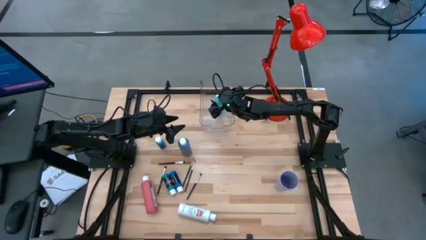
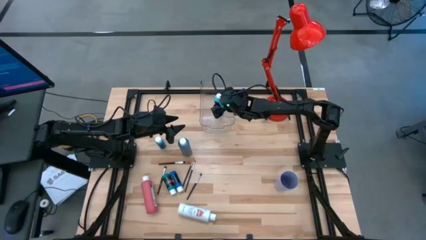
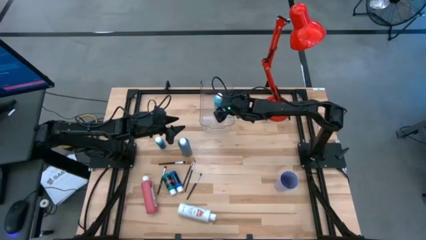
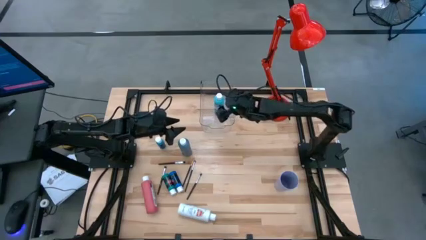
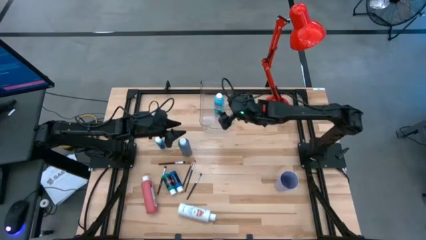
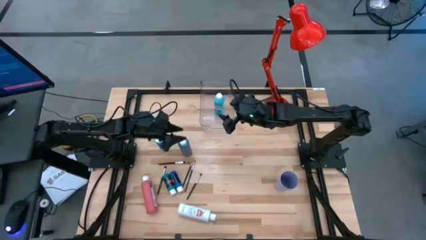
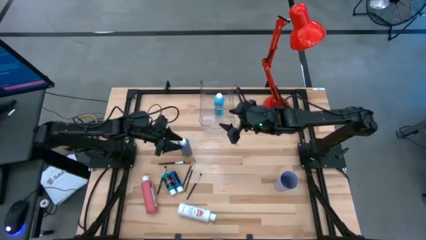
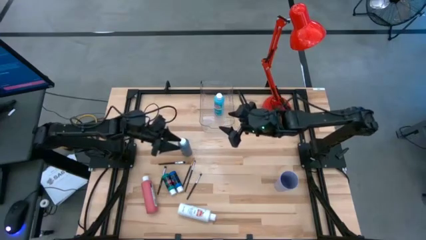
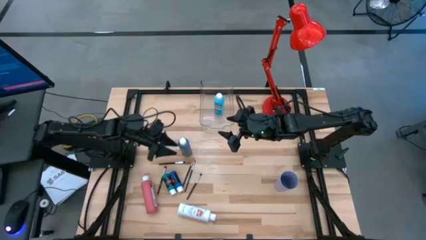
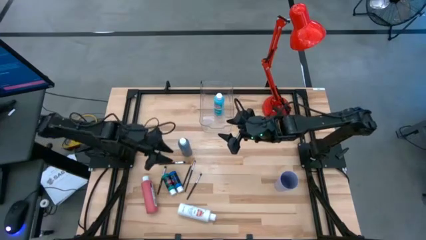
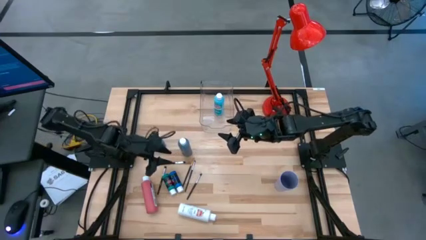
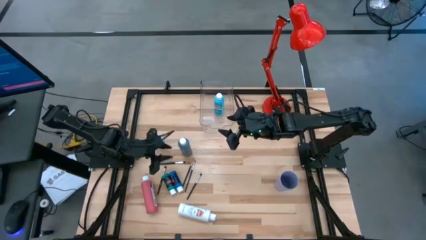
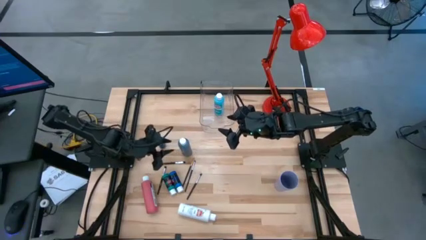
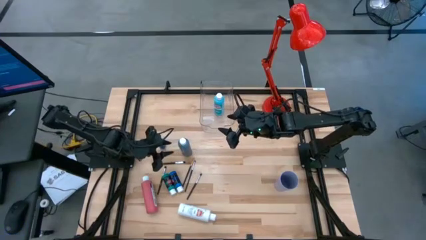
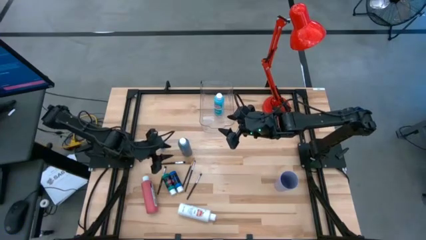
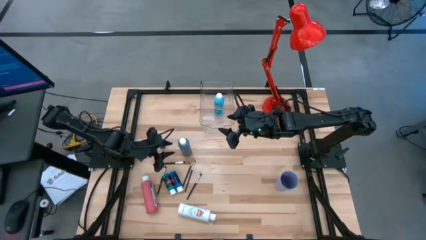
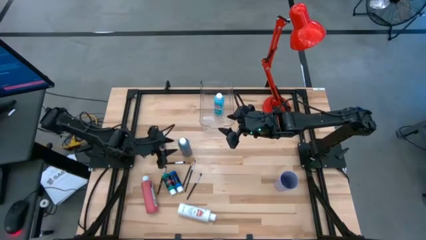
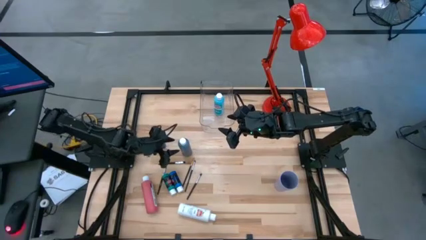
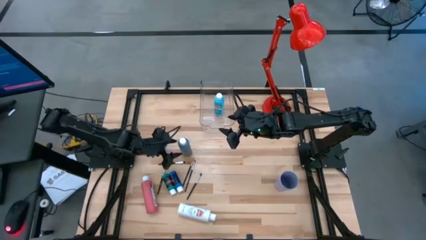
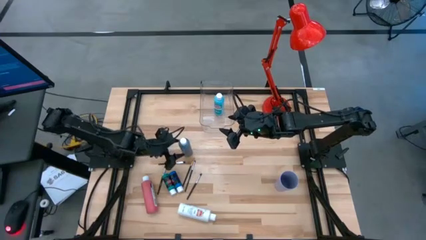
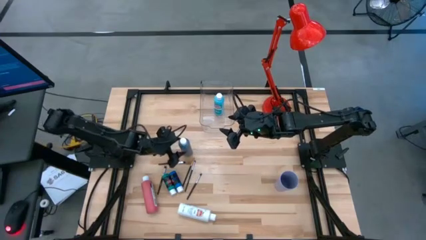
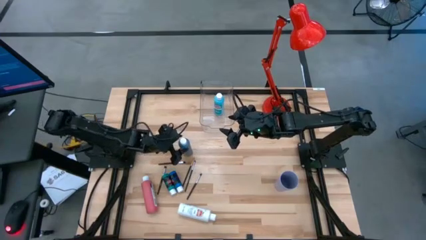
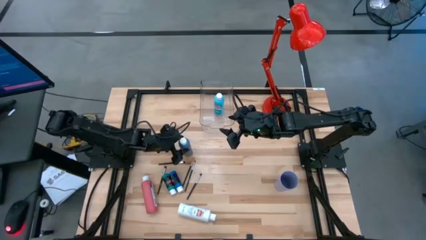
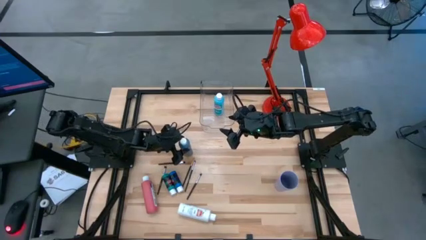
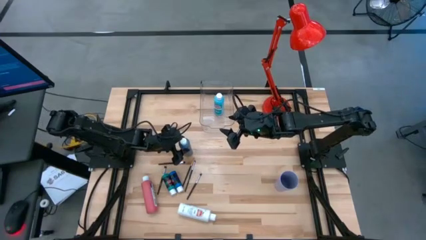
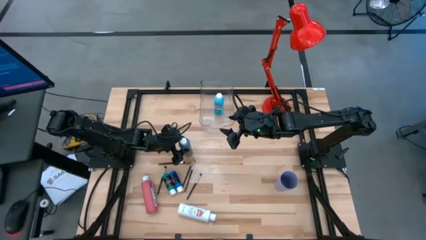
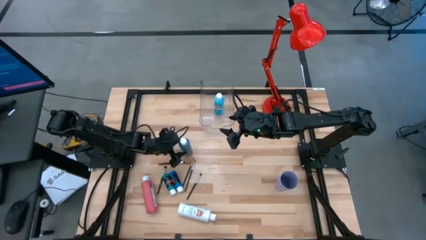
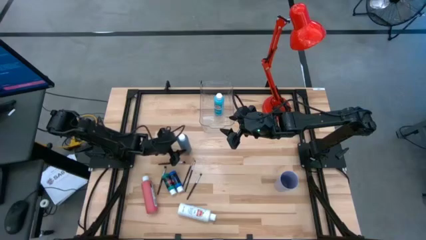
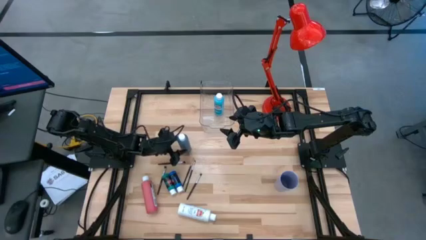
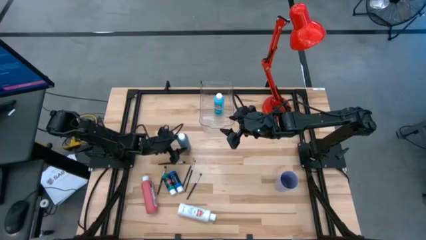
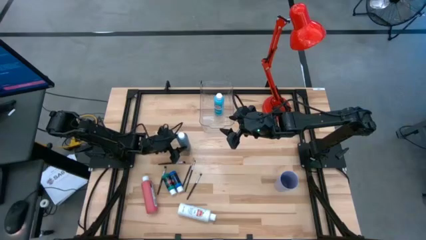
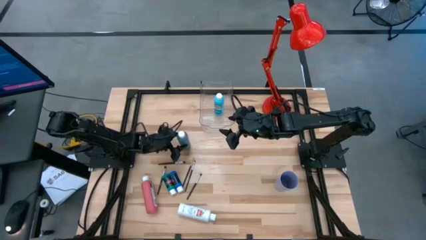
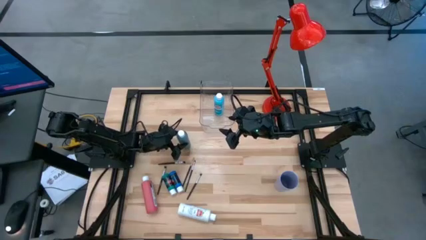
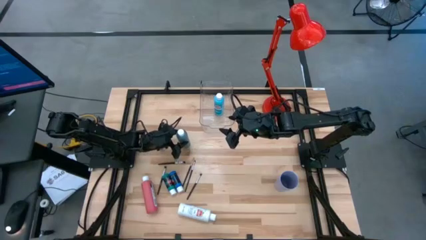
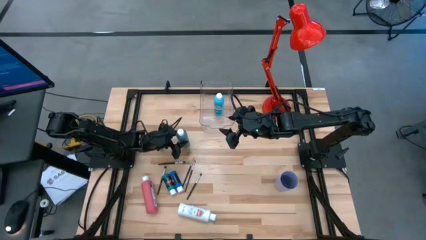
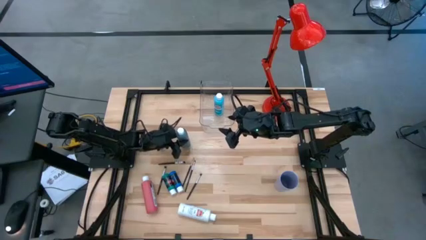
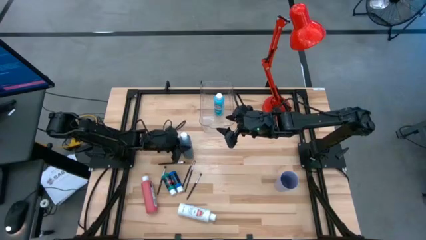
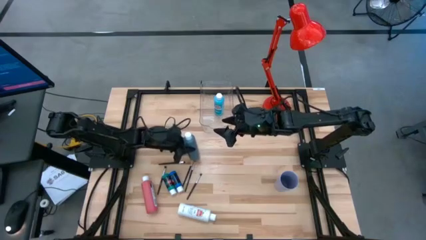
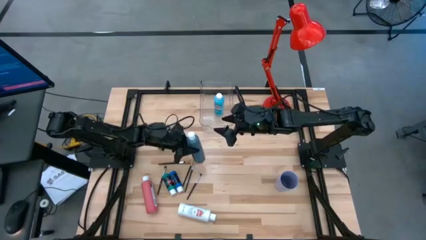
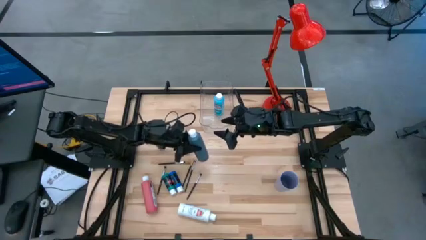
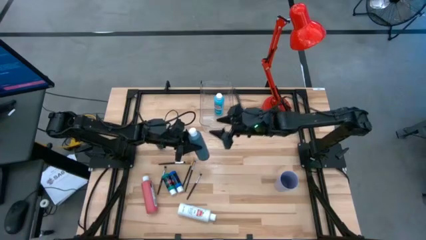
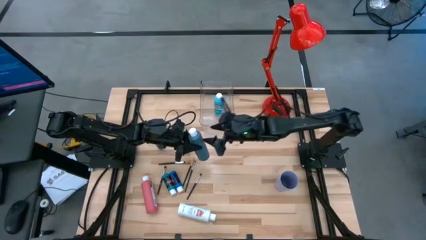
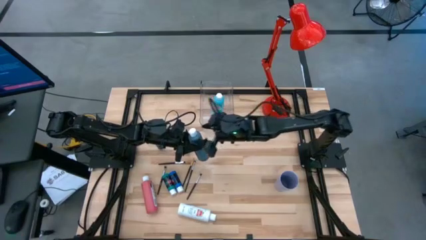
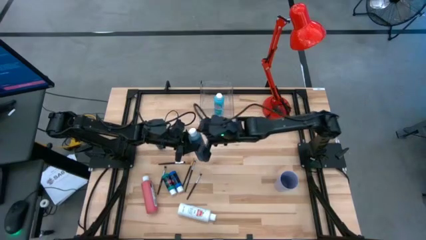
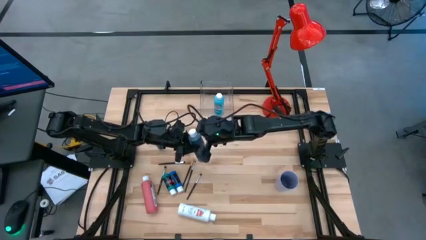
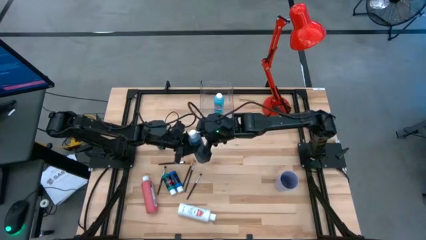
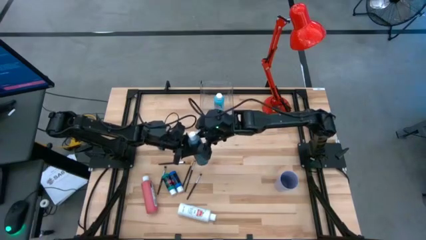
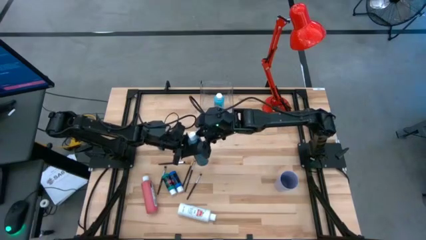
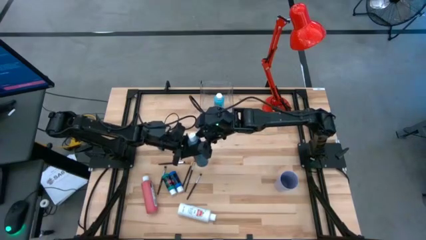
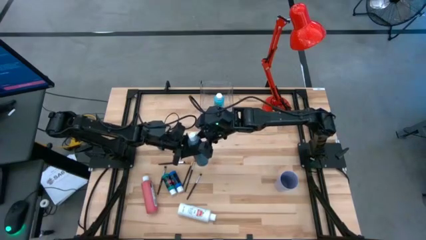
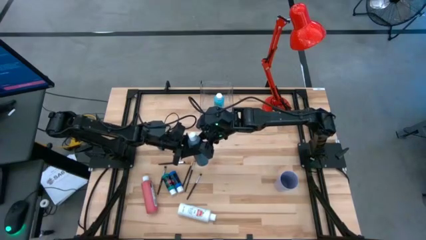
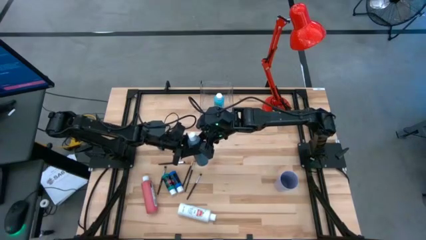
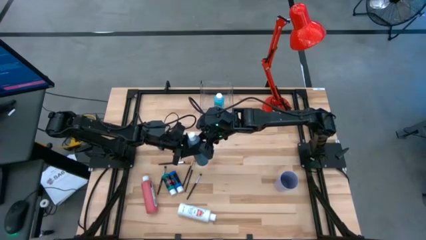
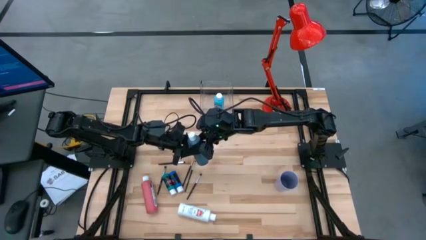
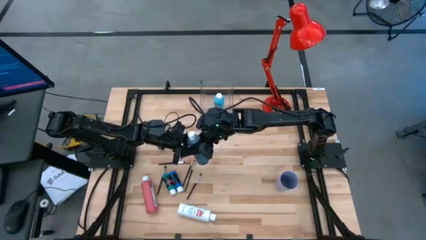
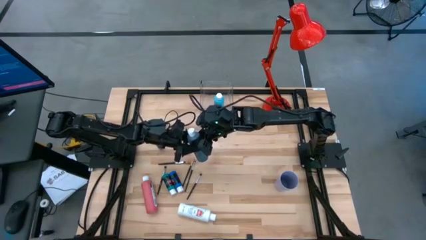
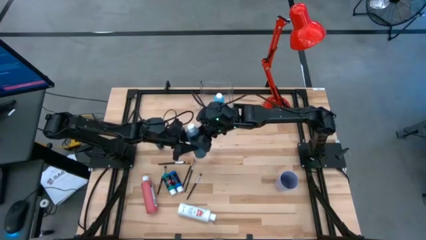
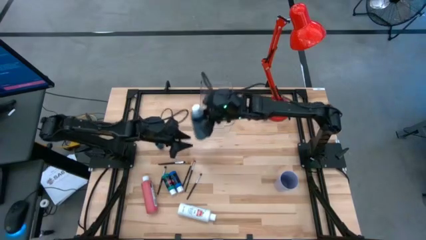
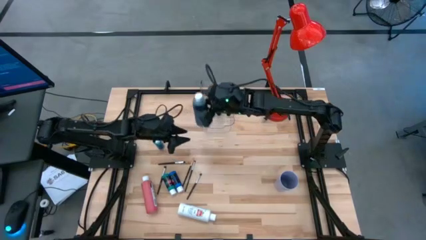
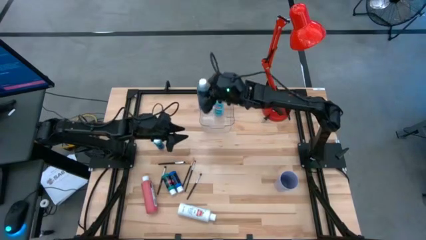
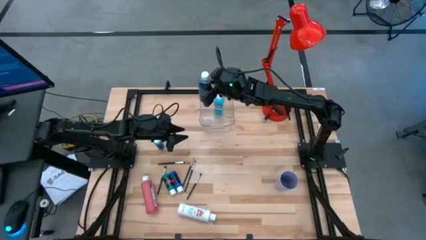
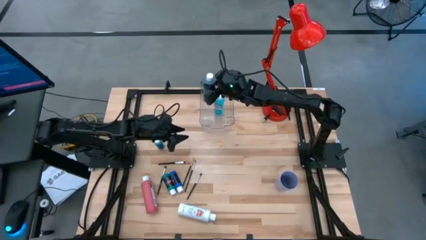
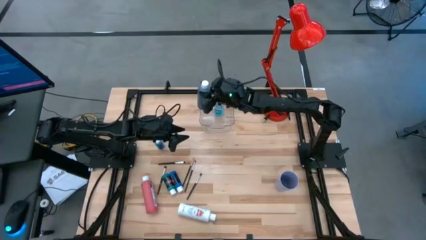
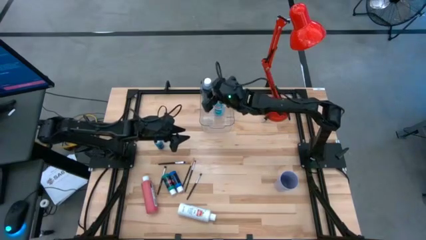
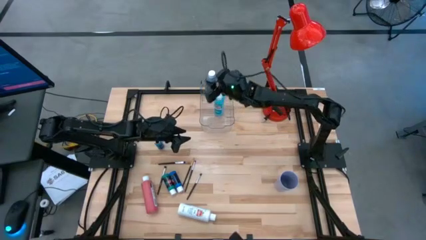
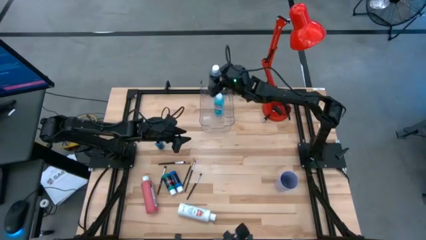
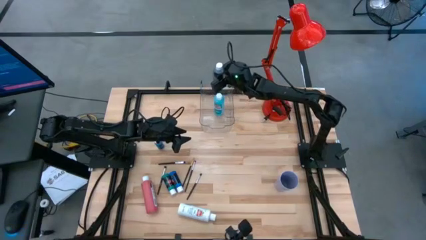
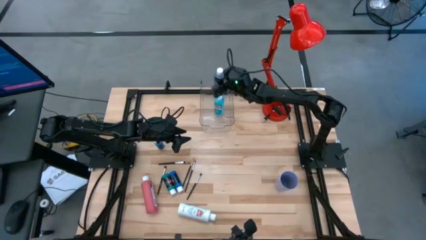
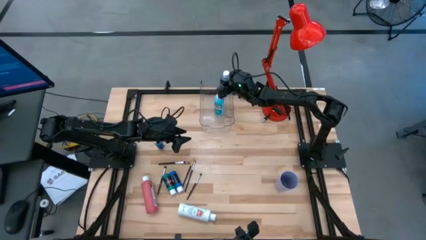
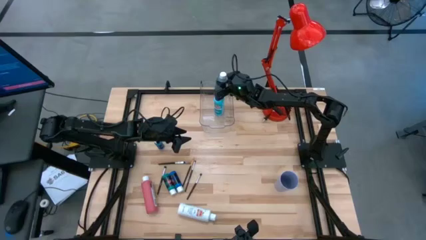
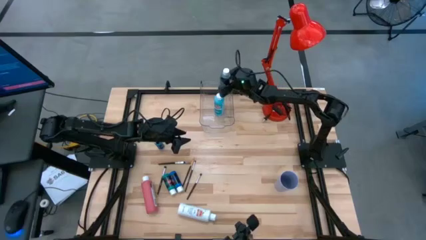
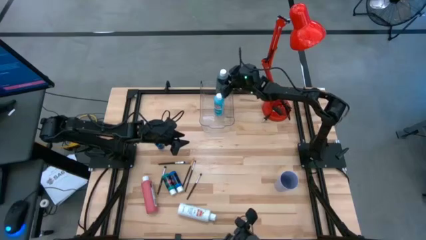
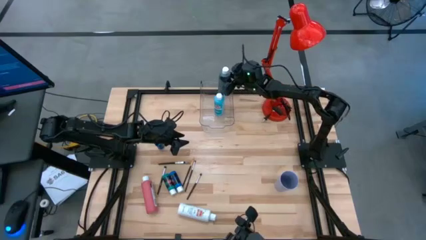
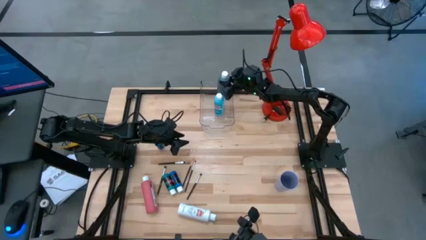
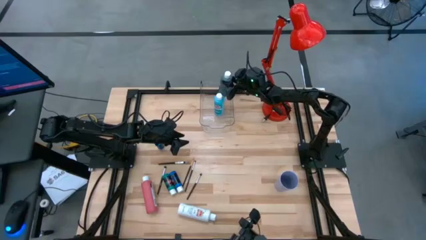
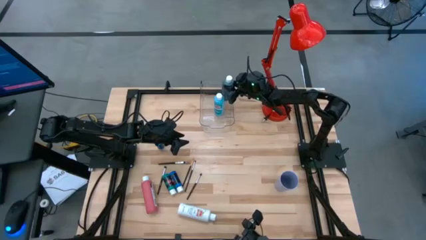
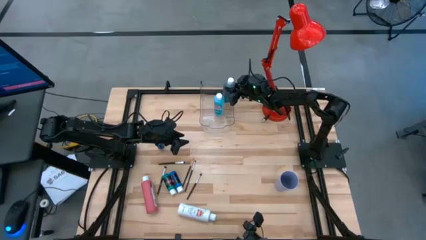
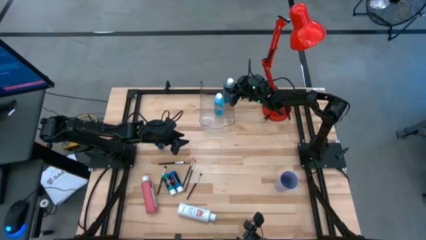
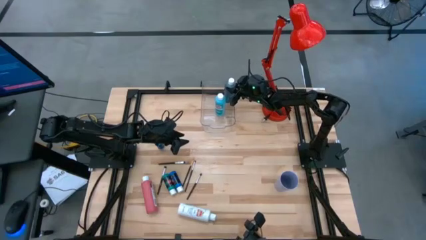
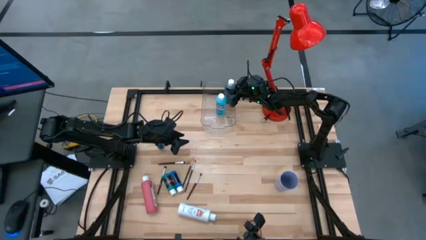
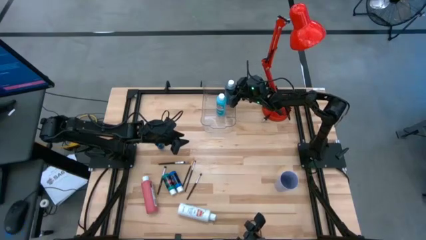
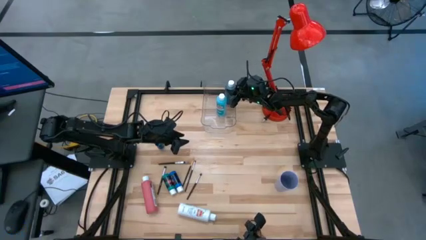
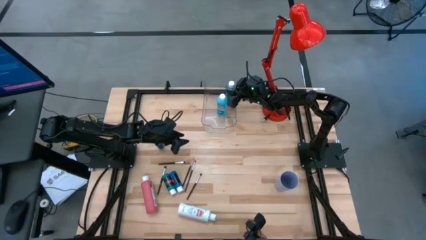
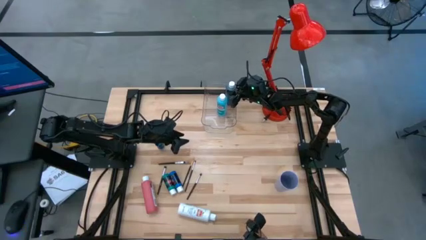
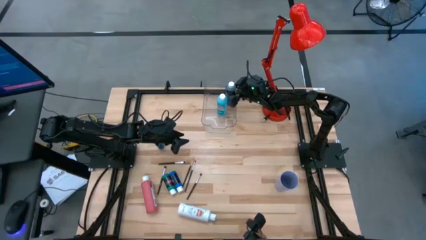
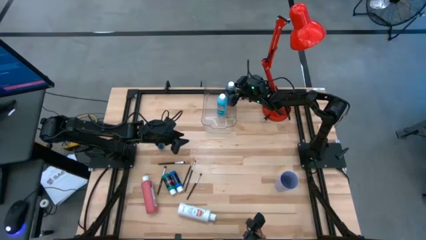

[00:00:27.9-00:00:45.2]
Task: Pick & Place Paint Supplies
Put the black paint bottle into the transparent bin
